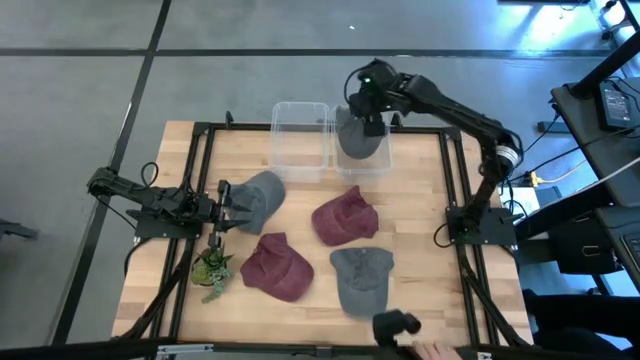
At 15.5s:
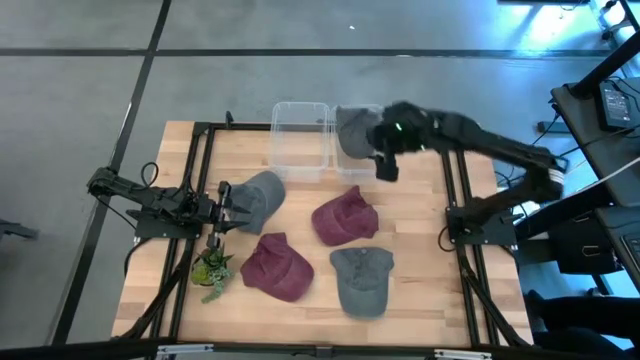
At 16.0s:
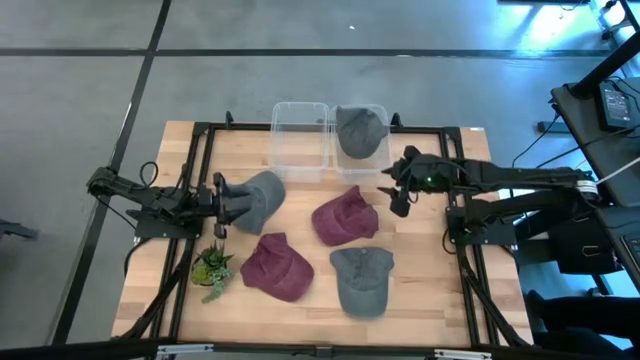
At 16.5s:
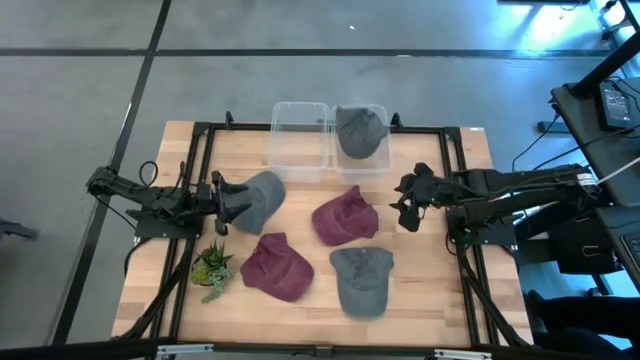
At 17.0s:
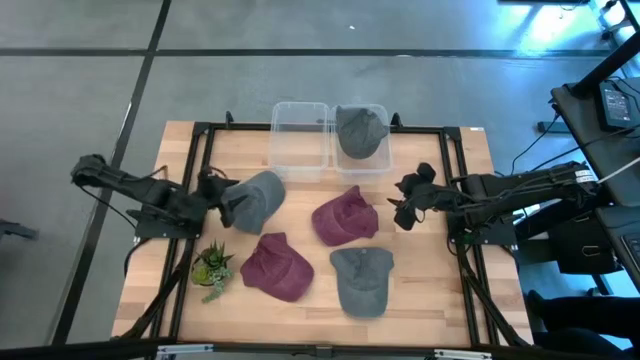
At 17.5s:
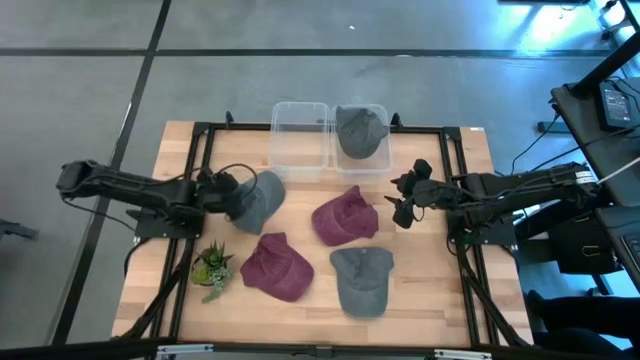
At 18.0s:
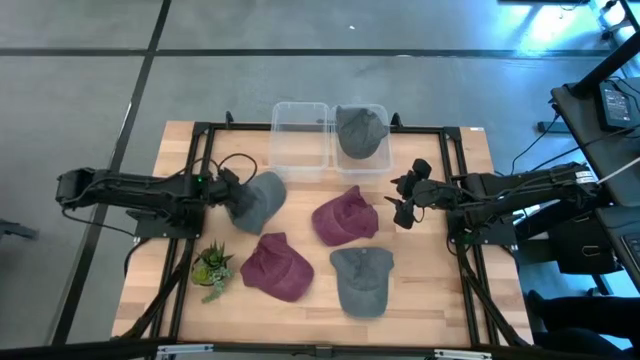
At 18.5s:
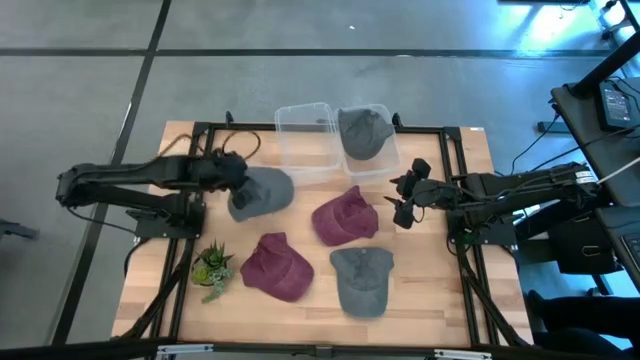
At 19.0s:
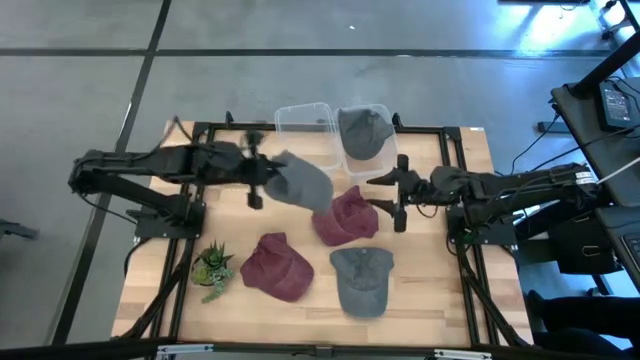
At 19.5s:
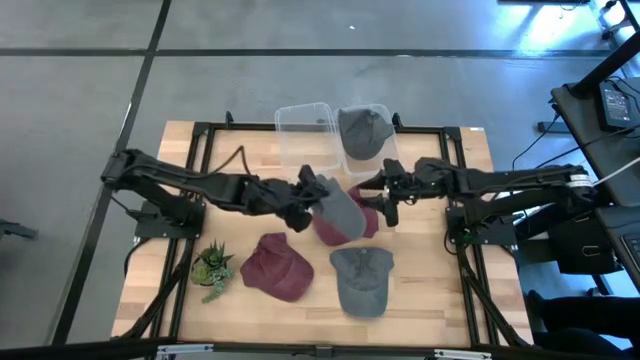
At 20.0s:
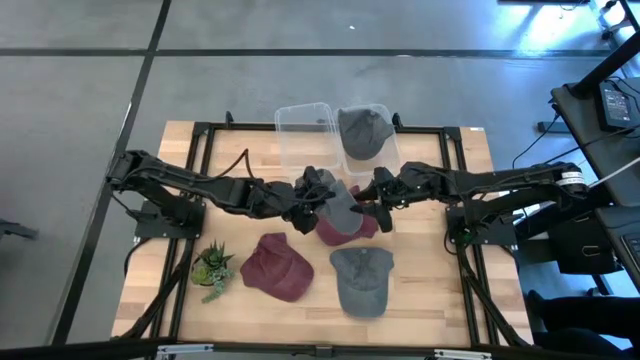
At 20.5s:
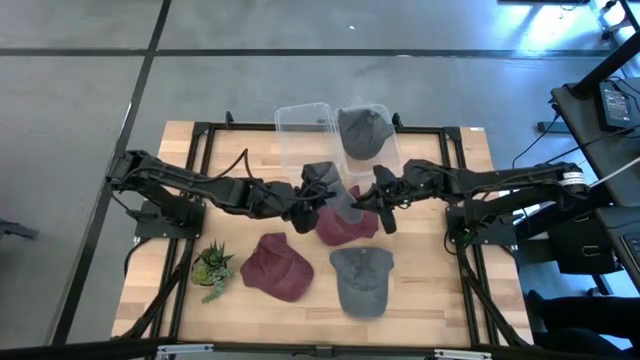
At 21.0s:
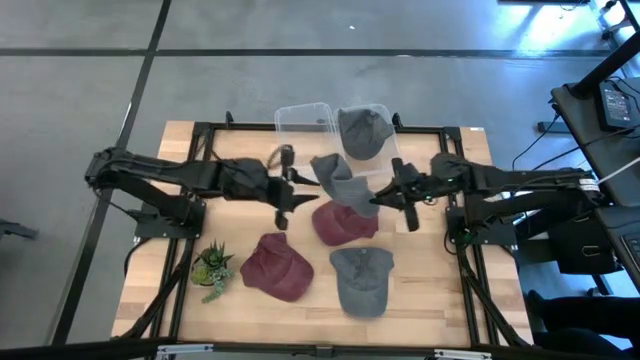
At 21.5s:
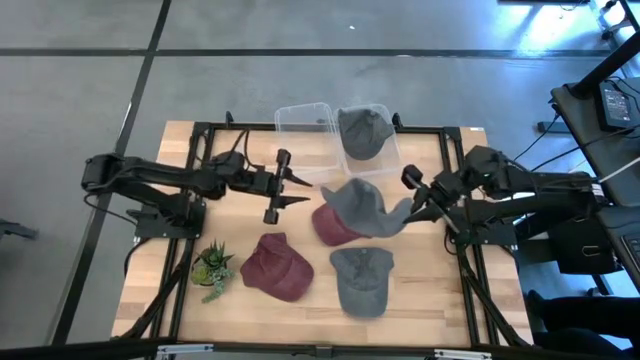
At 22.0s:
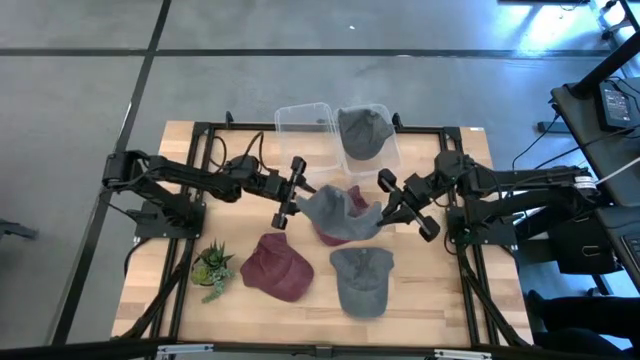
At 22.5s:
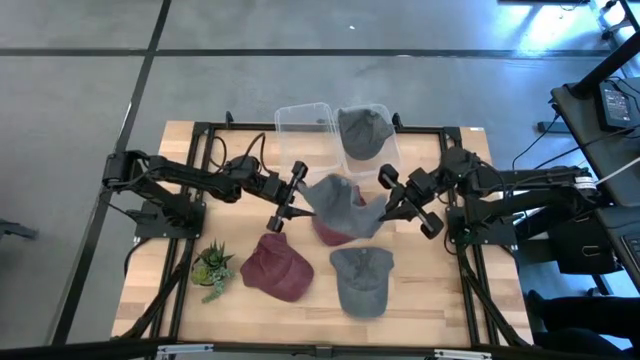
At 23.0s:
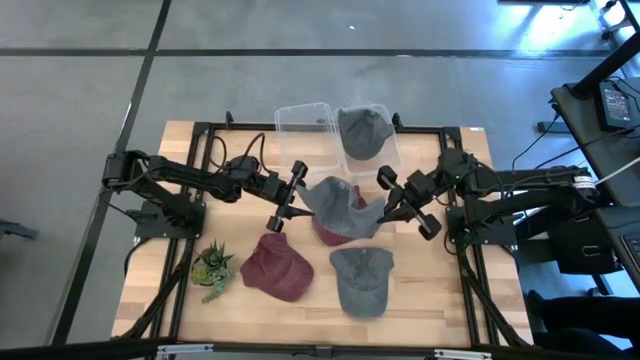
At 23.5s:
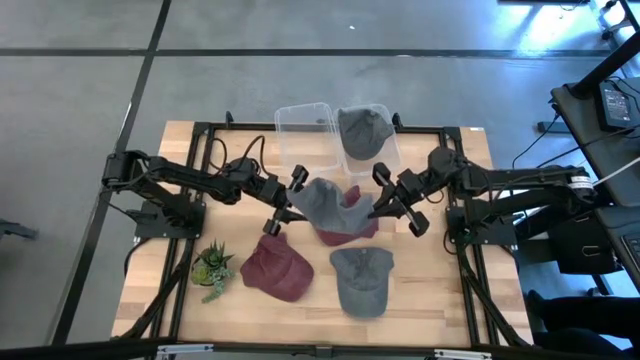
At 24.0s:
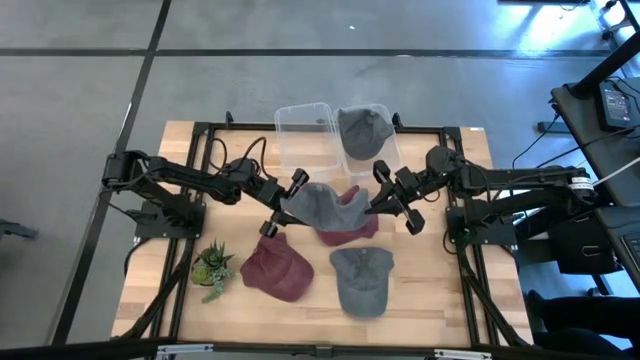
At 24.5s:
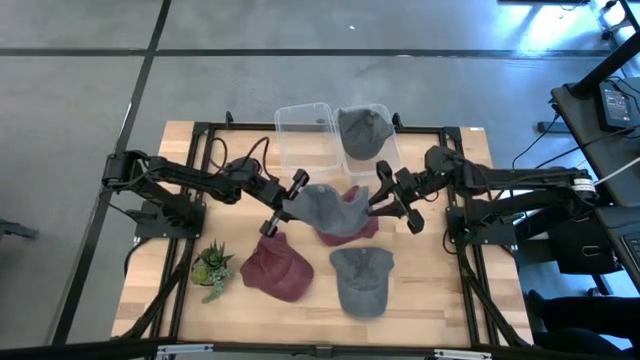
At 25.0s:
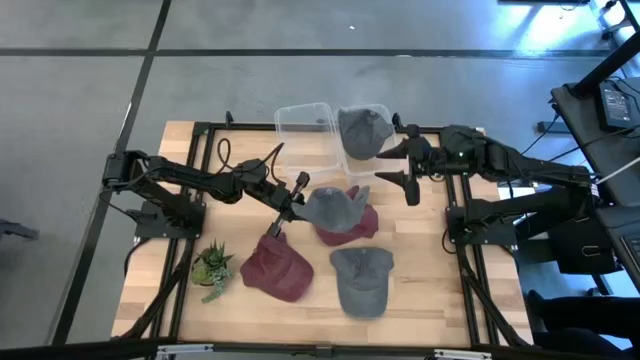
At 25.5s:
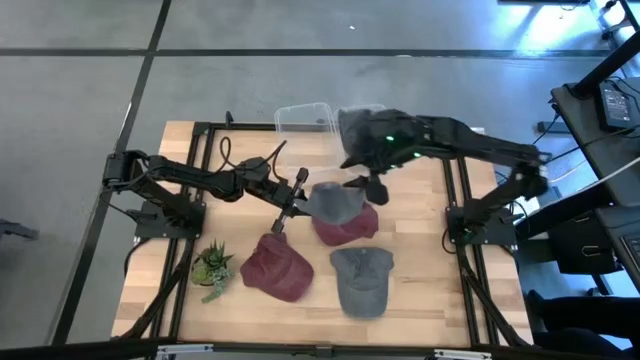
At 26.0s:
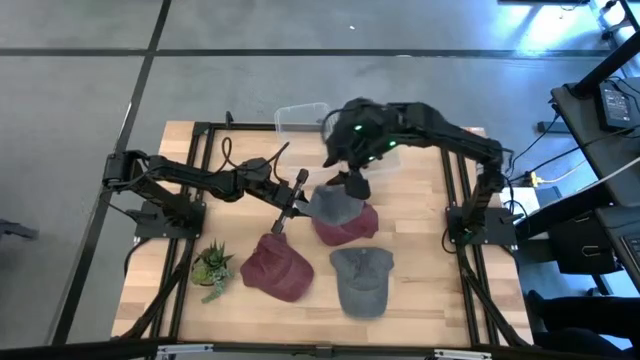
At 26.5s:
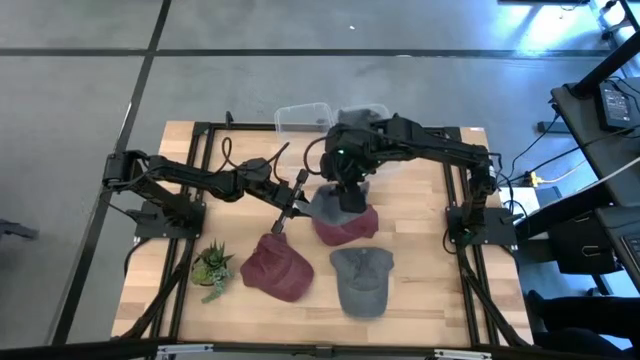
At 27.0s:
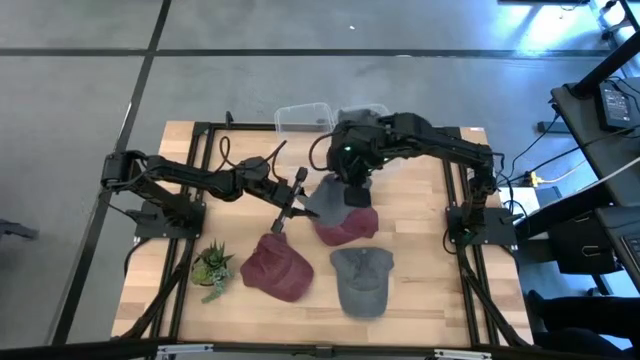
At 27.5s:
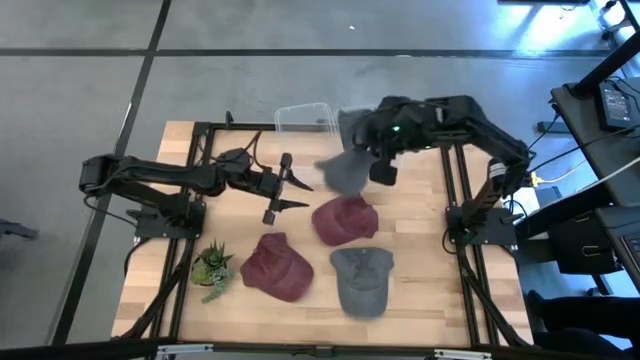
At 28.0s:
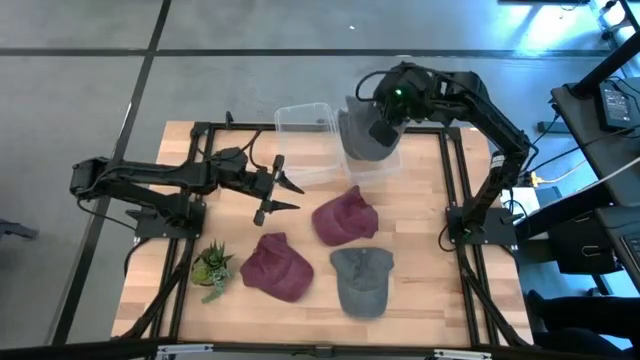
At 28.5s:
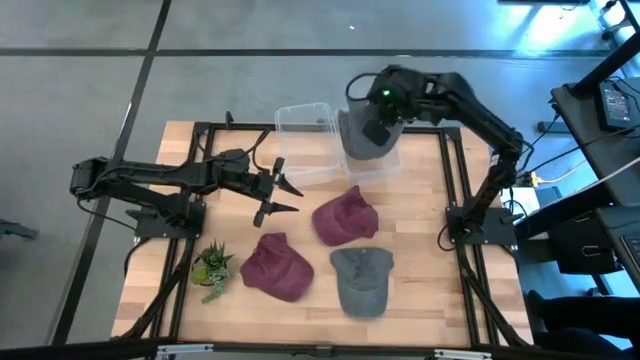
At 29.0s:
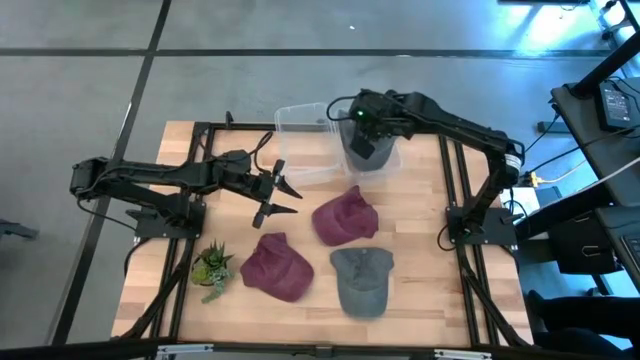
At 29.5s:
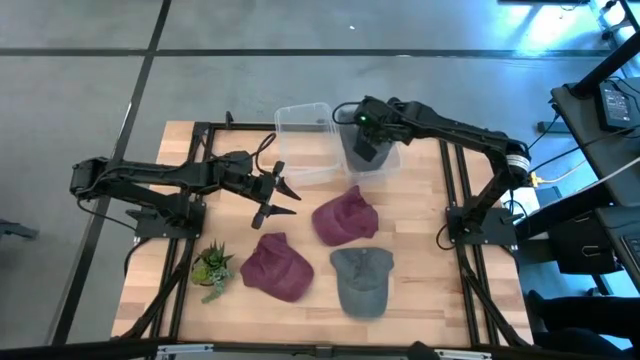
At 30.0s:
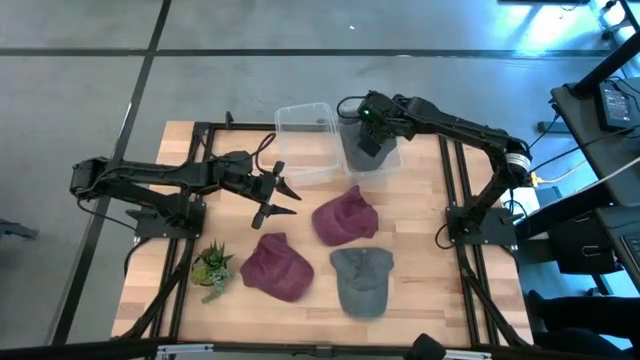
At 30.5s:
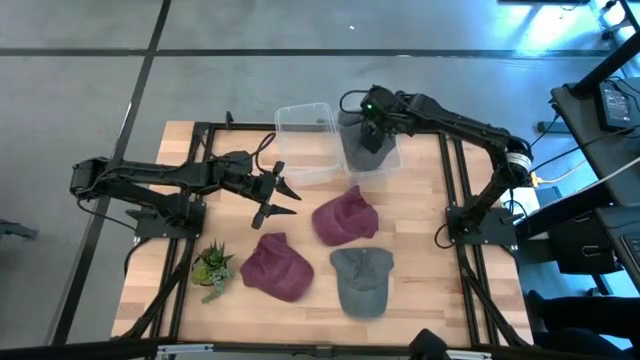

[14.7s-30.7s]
Task: Pick & Place hat
Put the top black cap into the right transparent bin

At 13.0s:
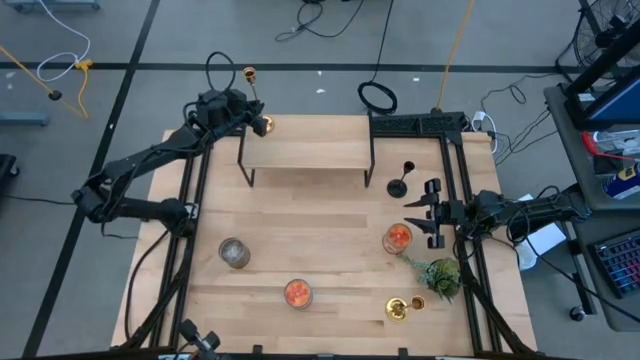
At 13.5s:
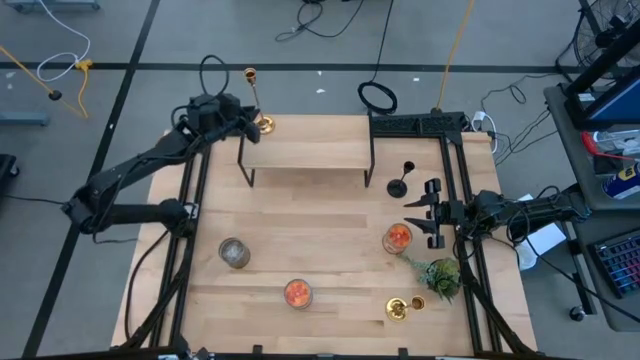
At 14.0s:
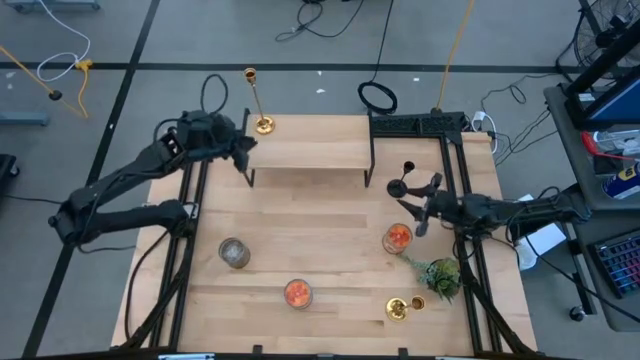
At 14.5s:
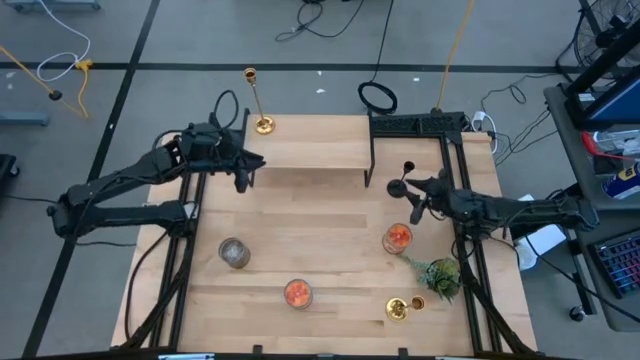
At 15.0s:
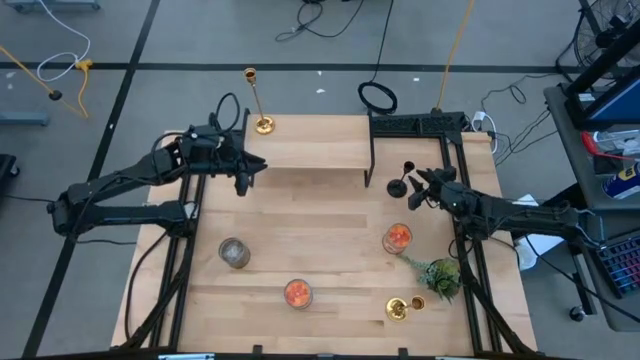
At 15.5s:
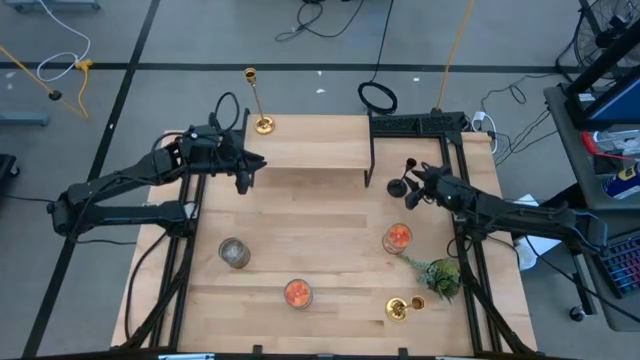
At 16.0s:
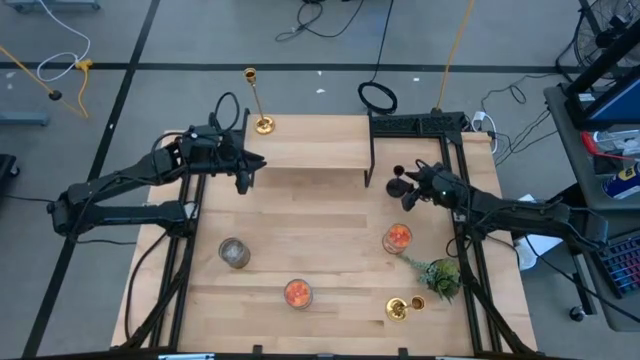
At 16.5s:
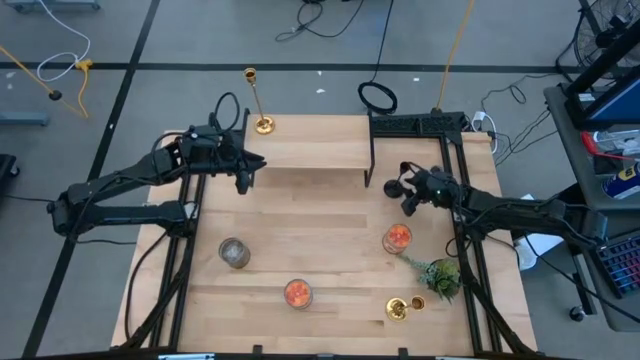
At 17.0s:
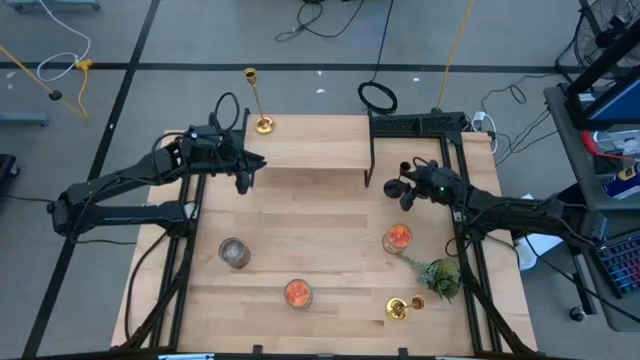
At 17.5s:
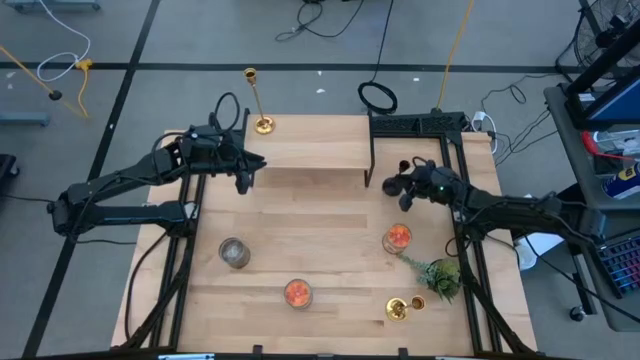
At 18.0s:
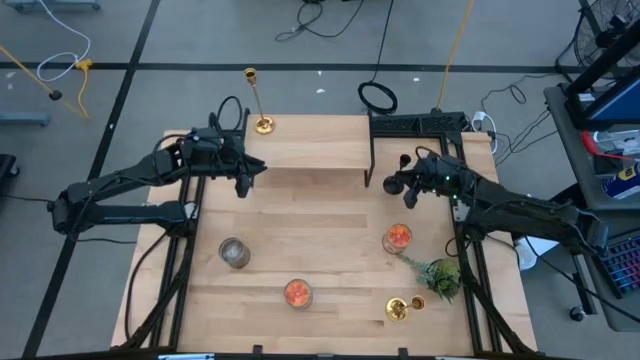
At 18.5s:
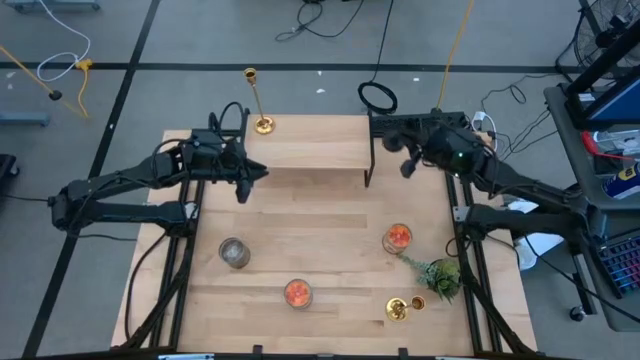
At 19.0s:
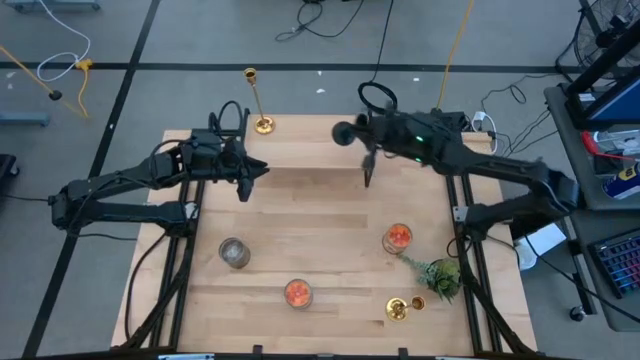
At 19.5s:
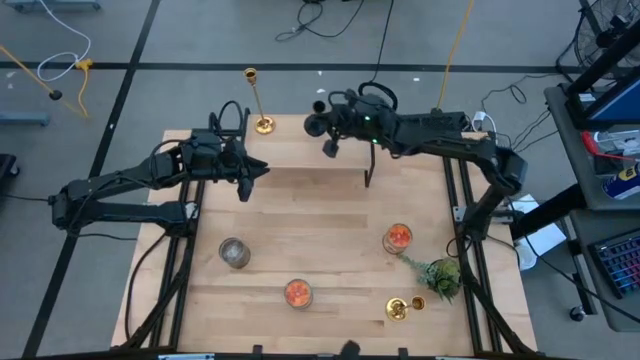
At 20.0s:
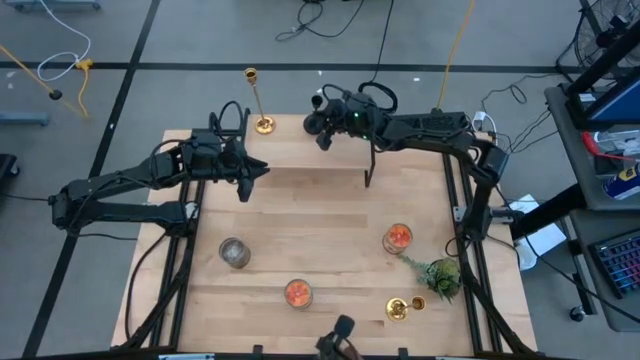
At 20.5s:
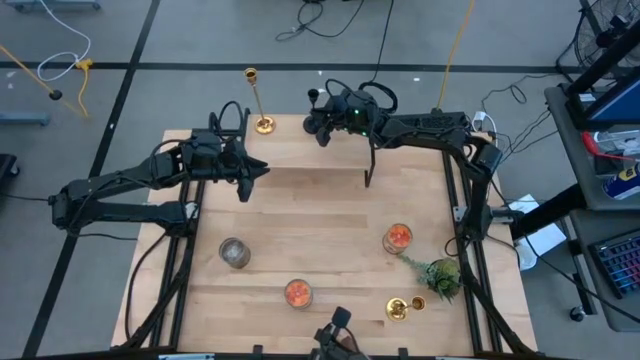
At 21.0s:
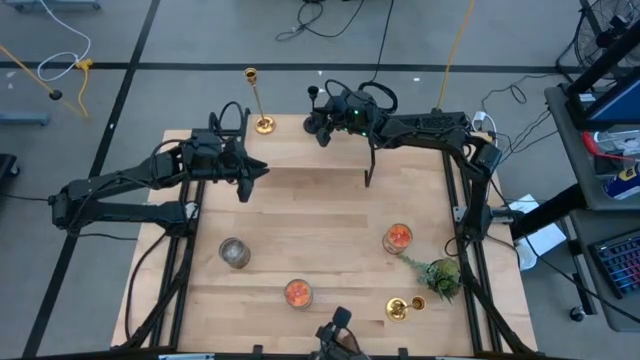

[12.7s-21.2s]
Task: Pick & Place candle stick holders
Put the black candleholder on the shelf
